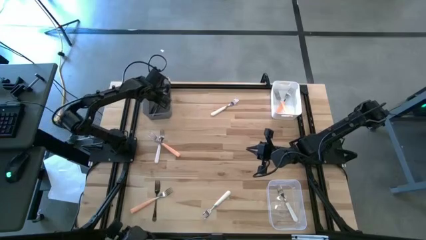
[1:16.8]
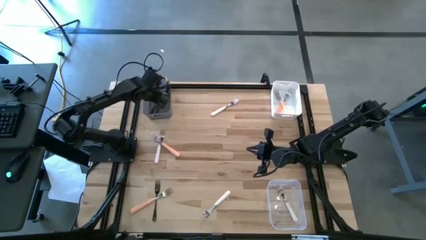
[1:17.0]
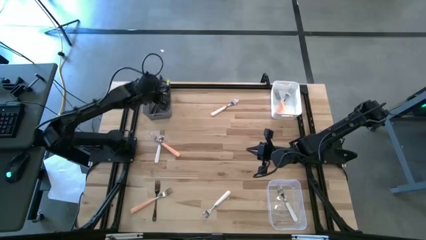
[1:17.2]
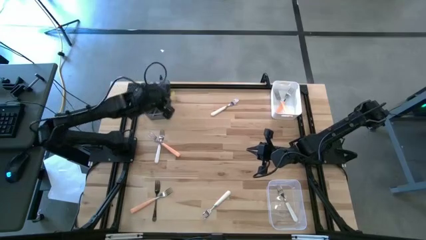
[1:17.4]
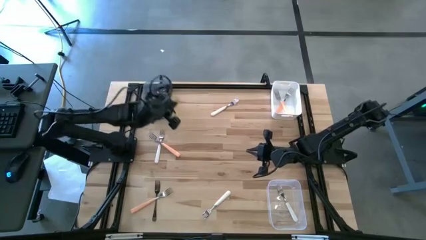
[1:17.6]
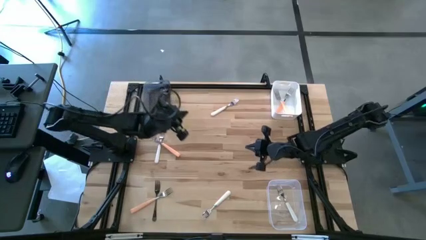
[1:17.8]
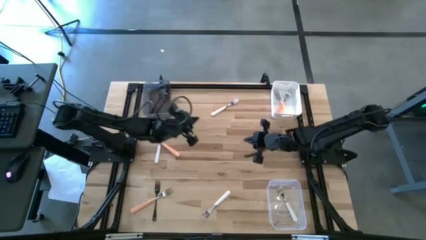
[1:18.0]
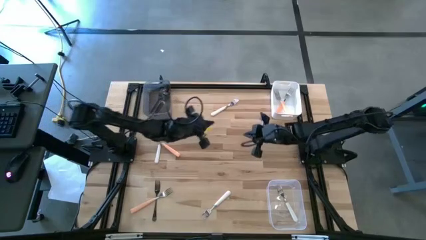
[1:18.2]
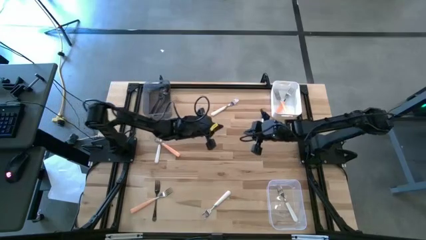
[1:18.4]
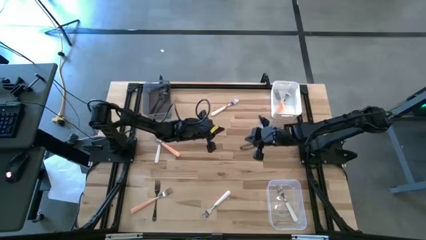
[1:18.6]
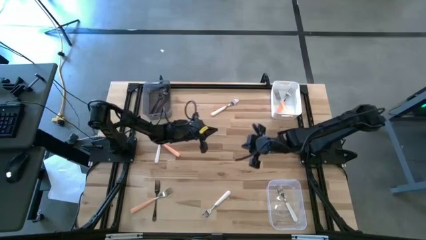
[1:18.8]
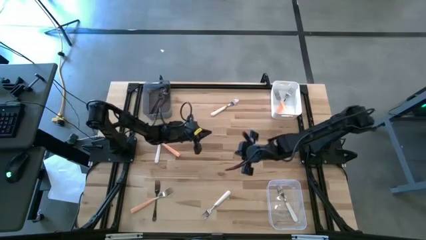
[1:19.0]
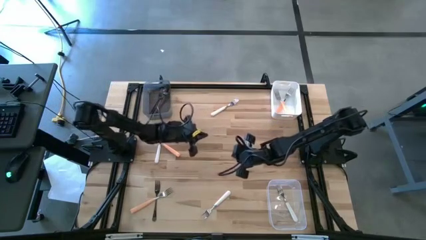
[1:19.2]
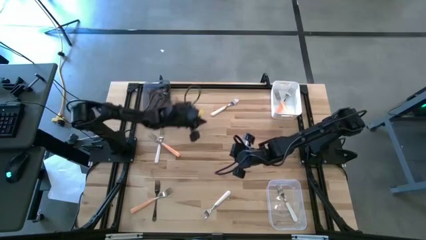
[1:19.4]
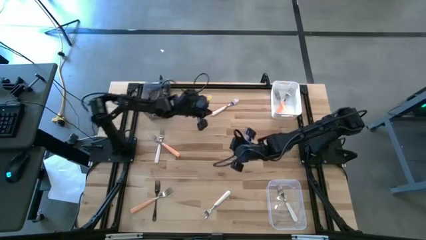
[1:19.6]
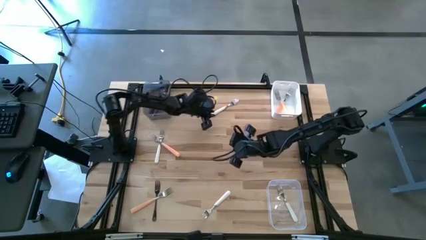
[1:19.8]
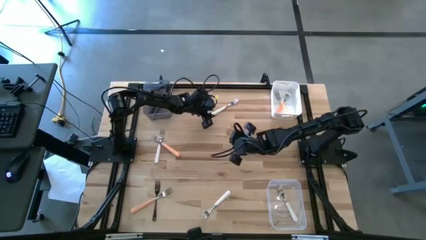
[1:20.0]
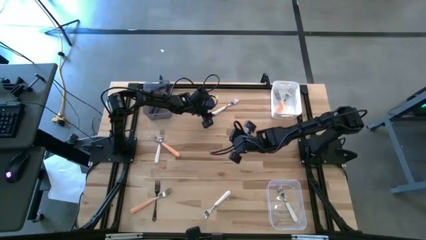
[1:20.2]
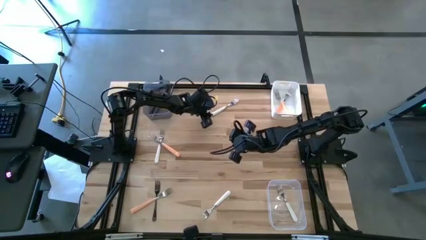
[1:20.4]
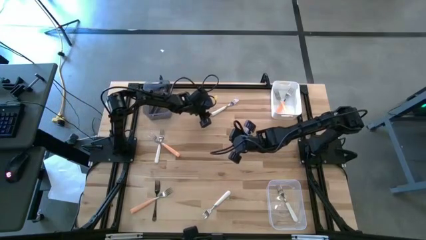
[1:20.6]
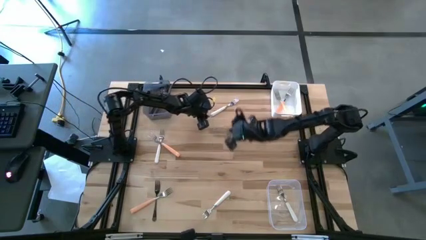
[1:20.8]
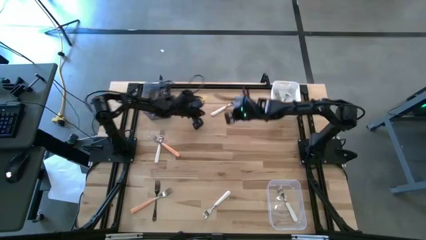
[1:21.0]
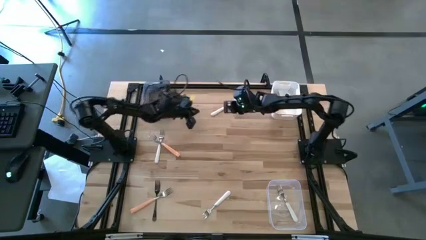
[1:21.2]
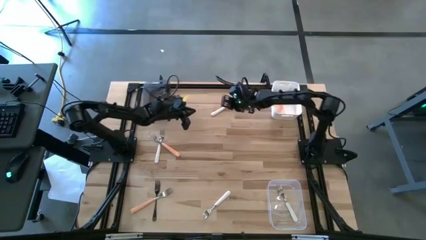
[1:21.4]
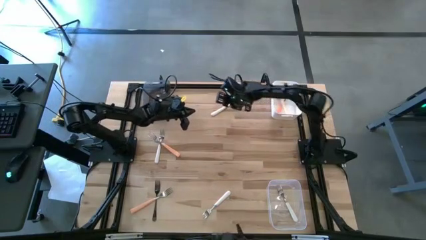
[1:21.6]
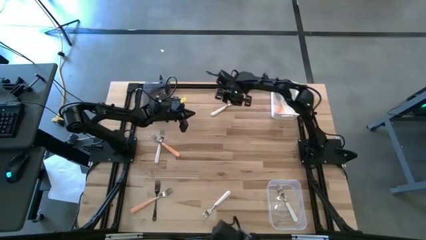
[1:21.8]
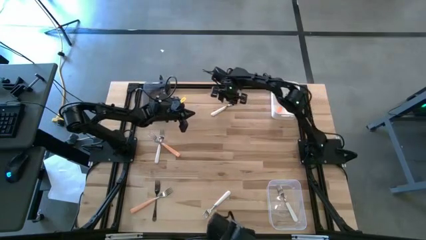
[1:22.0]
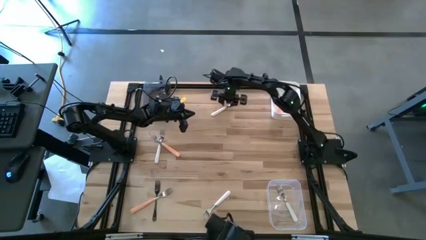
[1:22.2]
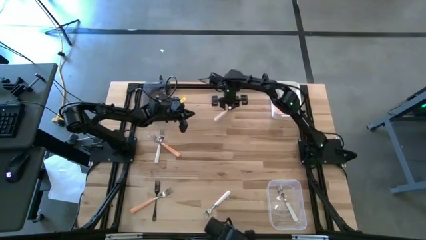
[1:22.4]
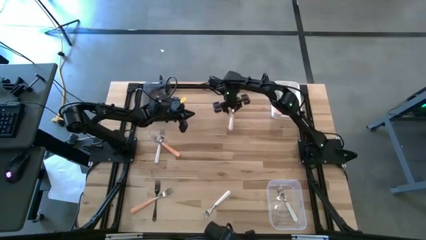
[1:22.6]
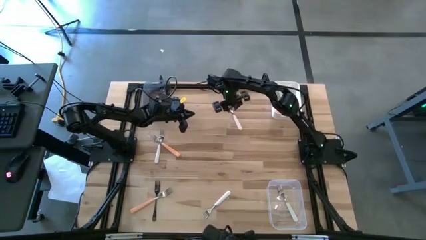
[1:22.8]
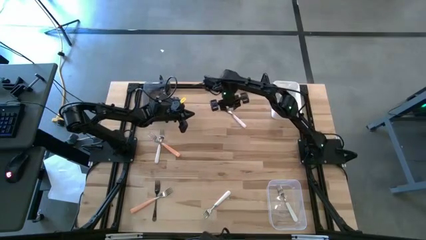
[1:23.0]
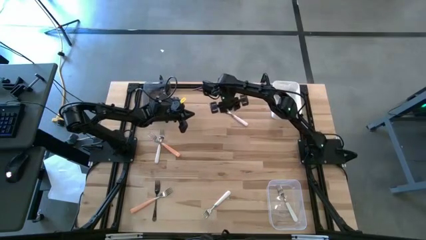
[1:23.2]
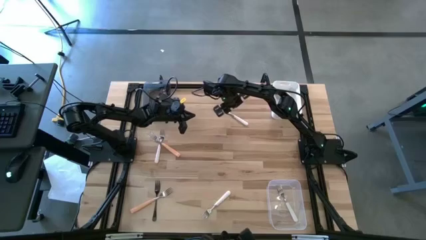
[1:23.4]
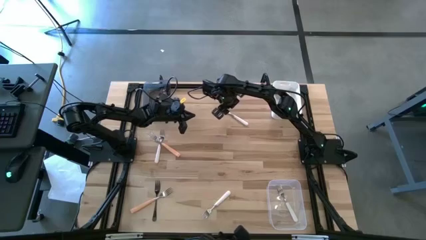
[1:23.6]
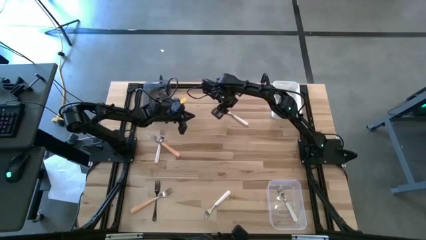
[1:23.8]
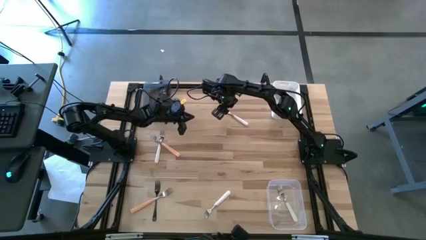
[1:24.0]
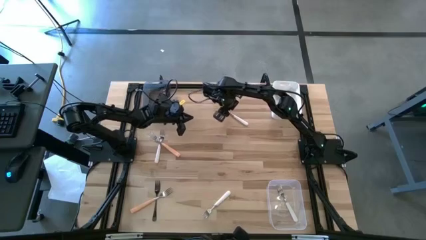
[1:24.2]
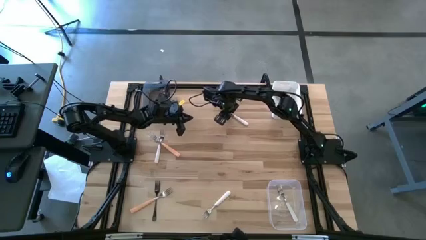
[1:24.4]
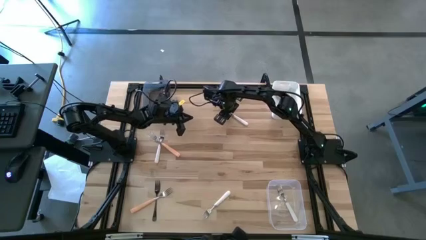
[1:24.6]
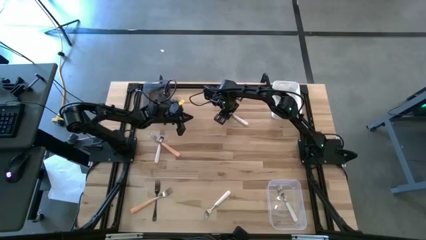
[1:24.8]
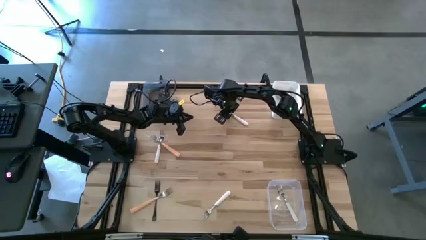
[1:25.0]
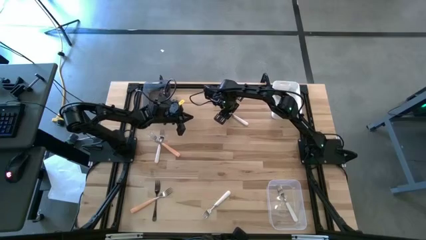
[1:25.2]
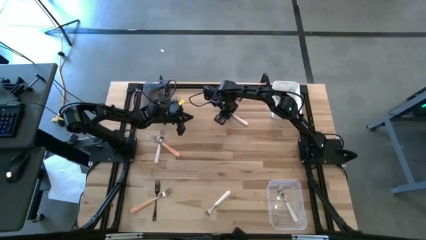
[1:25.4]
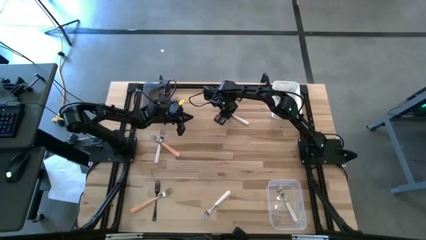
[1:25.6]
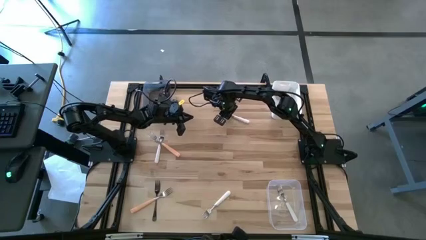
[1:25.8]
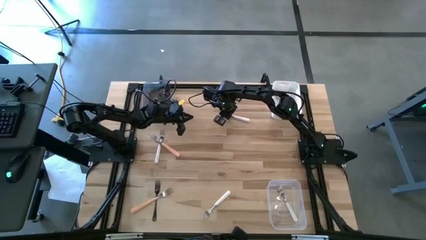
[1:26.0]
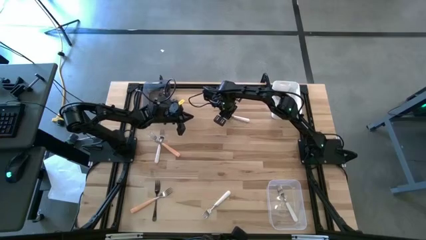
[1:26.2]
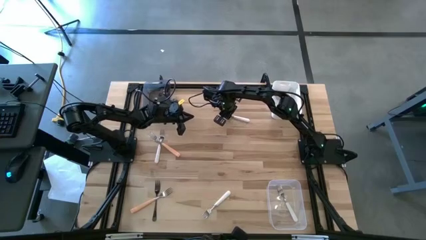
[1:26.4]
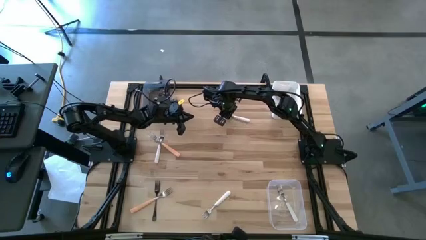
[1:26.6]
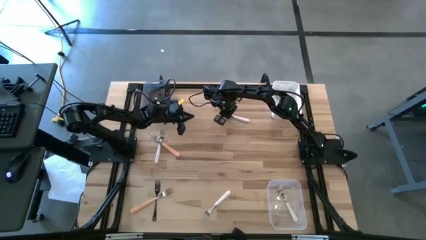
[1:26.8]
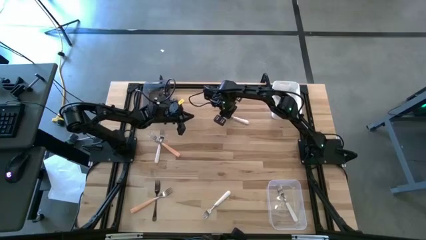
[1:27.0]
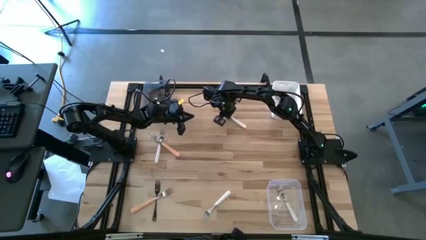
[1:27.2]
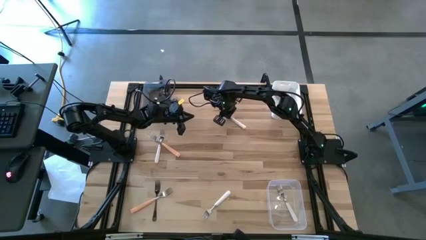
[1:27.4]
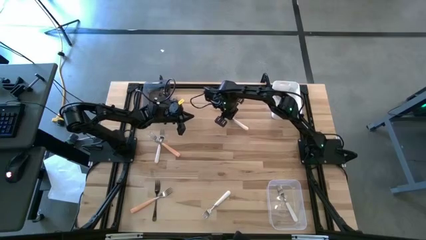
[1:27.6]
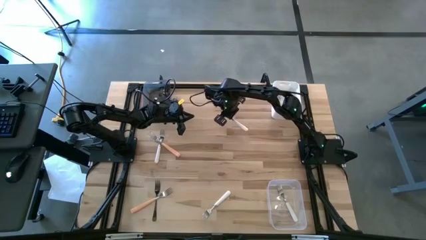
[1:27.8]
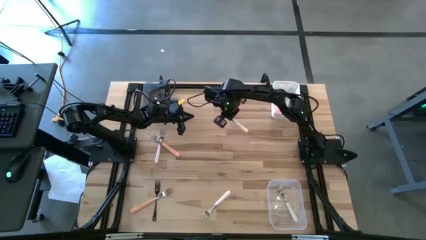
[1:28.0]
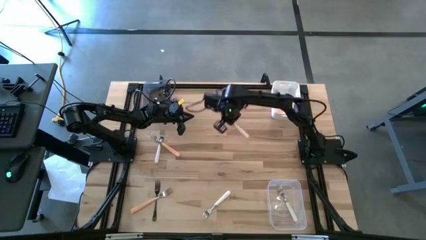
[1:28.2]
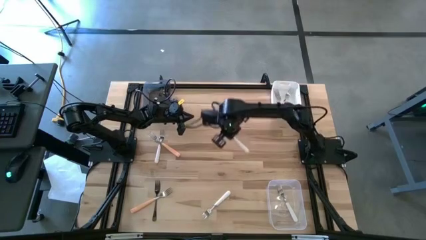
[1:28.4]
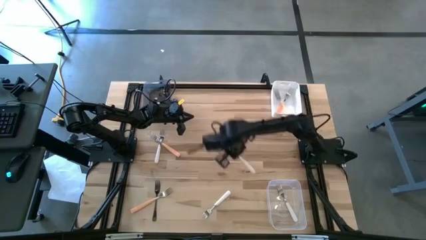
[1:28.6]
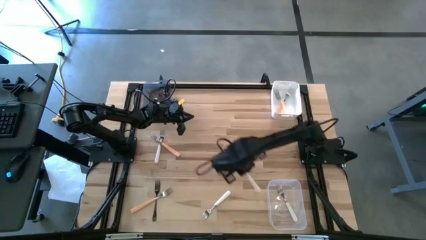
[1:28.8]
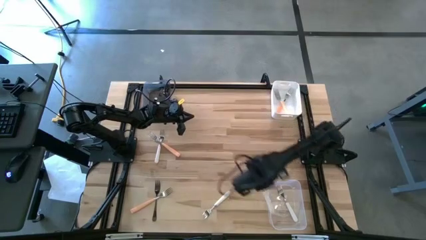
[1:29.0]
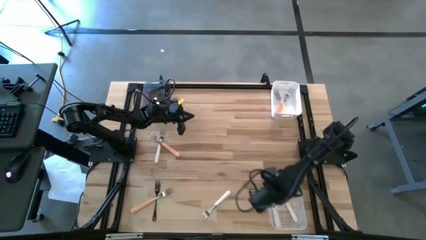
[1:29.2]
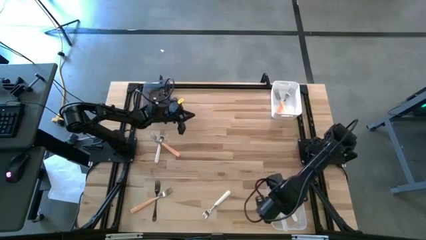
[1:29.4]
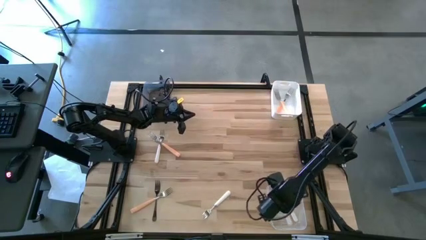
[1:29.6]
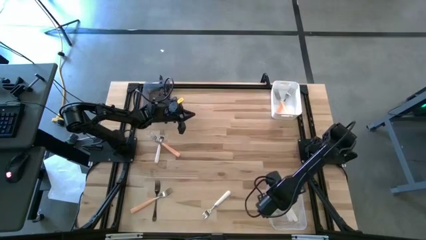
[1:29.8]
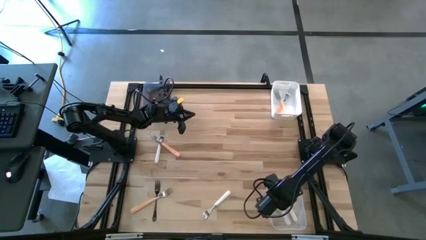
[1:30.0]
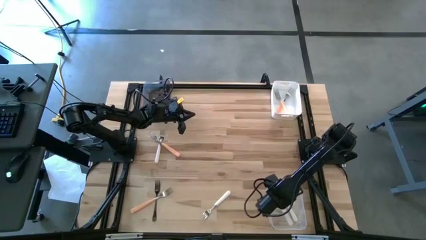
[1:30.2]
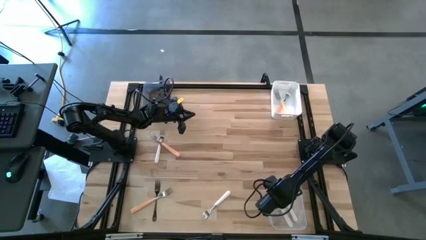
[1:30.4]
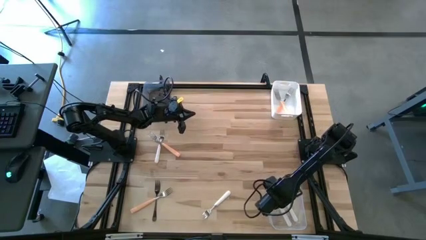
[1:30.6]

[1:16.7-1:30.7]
Task: Sort silverware by color (type)
Put the top white fork into the transparent bin
